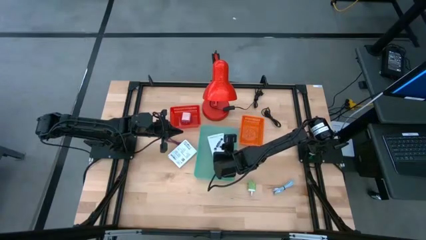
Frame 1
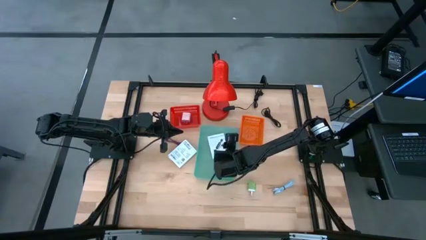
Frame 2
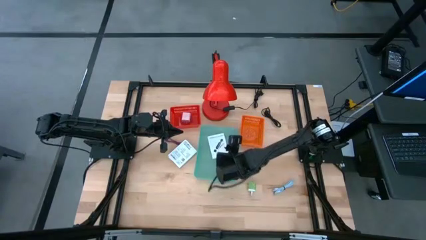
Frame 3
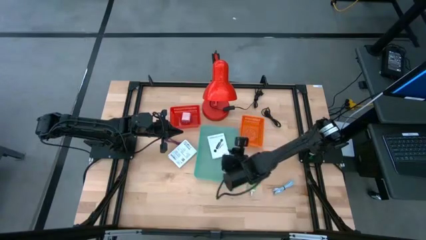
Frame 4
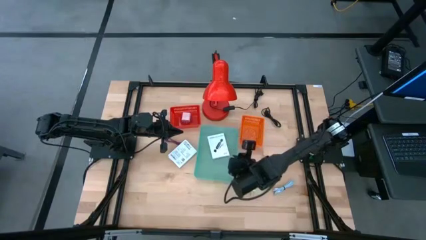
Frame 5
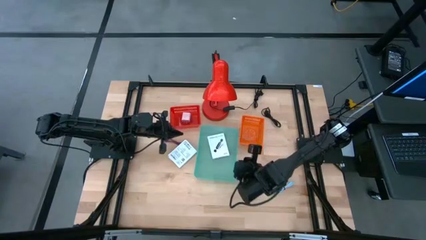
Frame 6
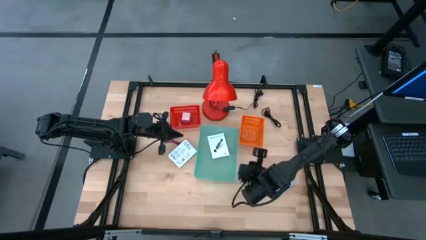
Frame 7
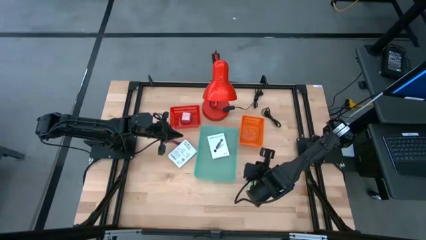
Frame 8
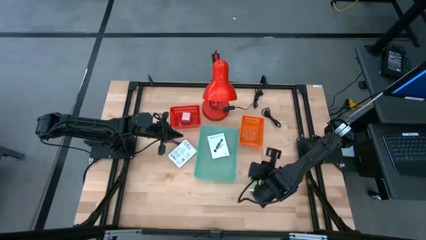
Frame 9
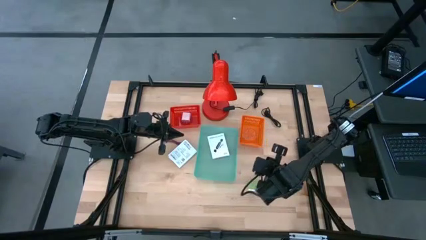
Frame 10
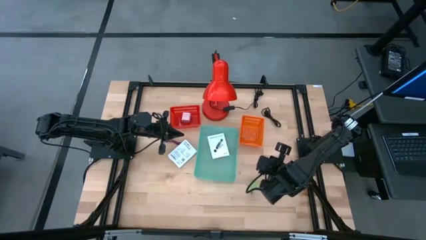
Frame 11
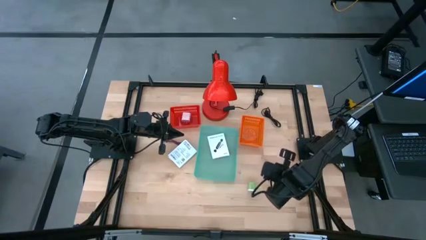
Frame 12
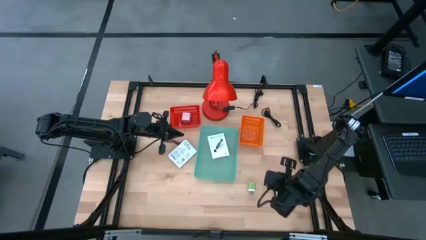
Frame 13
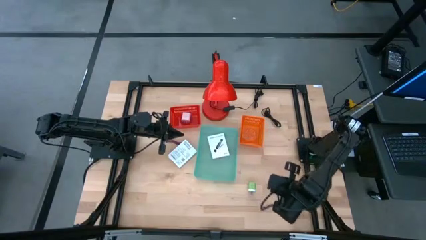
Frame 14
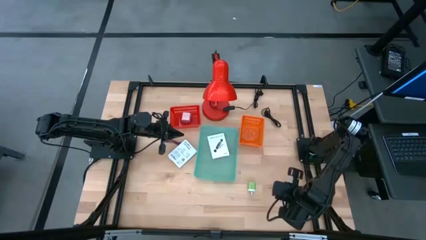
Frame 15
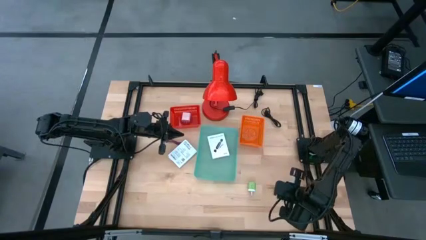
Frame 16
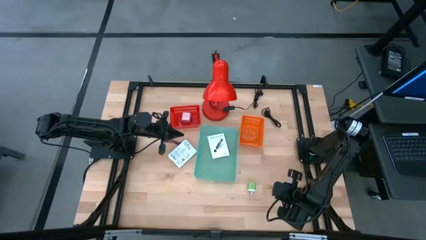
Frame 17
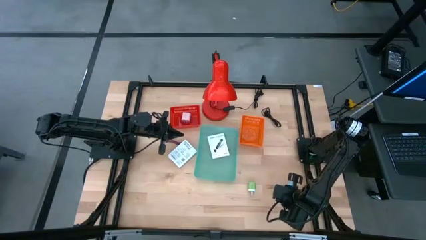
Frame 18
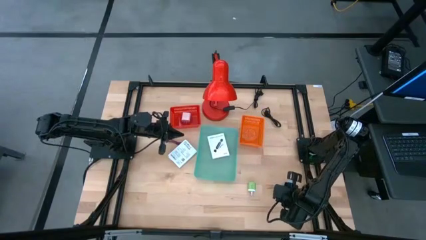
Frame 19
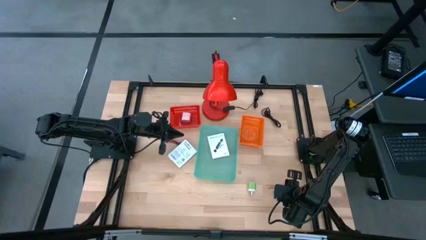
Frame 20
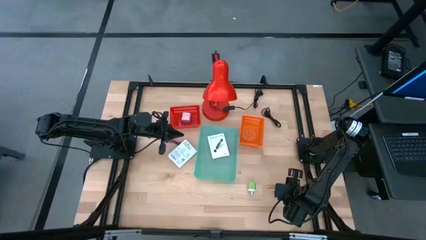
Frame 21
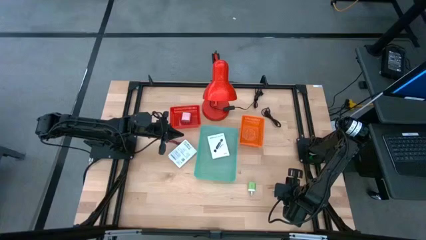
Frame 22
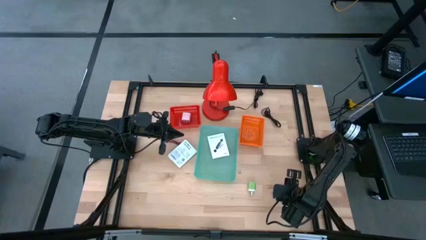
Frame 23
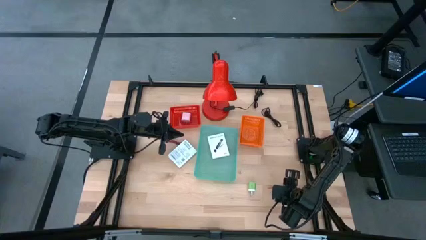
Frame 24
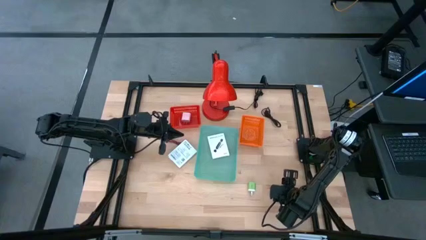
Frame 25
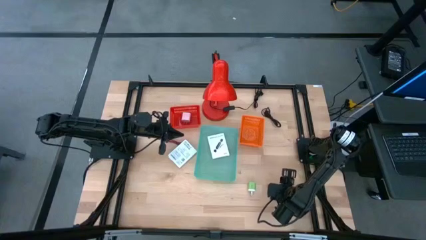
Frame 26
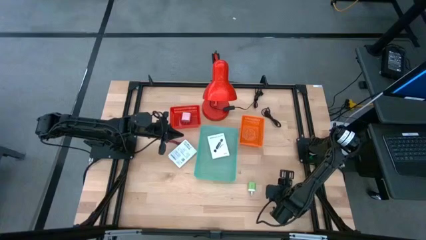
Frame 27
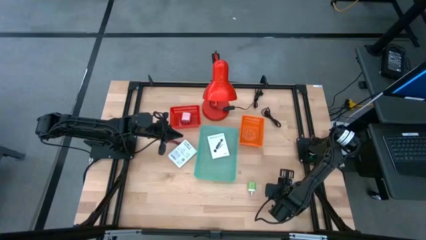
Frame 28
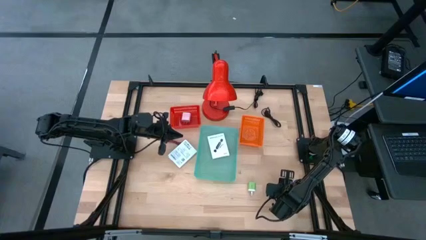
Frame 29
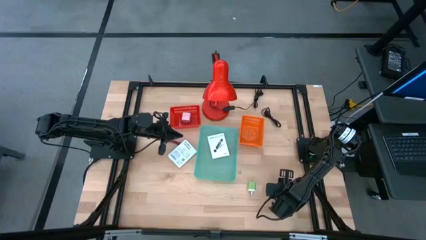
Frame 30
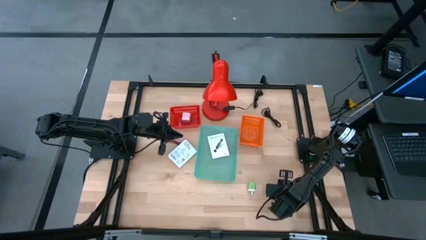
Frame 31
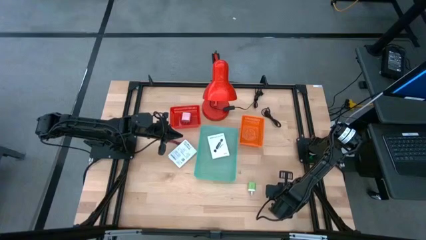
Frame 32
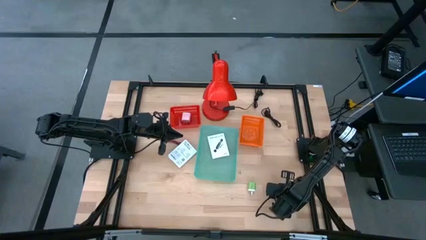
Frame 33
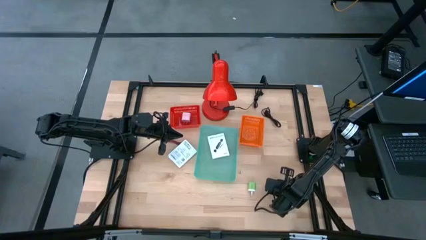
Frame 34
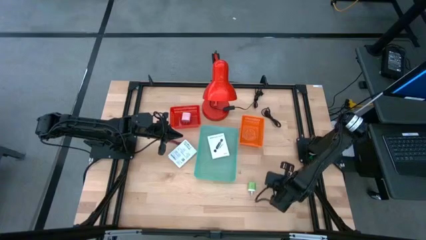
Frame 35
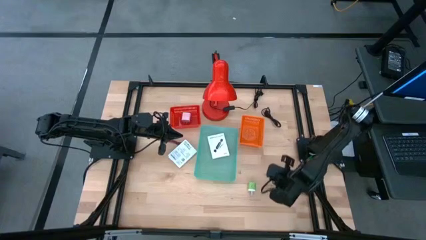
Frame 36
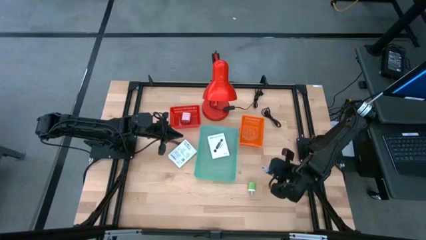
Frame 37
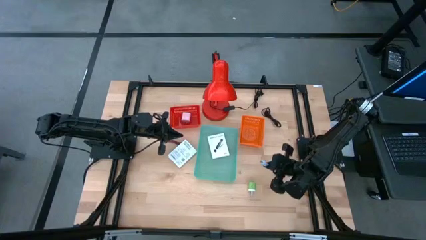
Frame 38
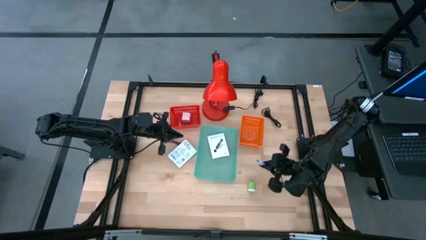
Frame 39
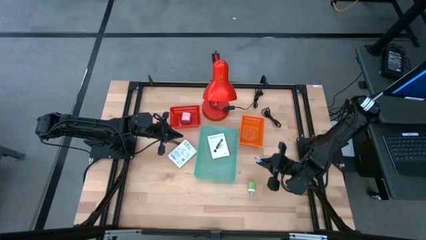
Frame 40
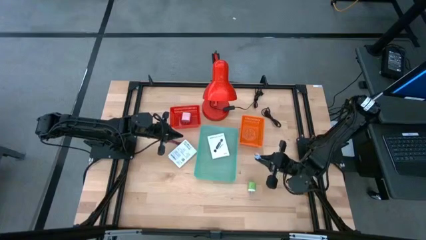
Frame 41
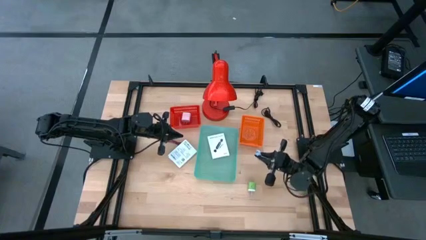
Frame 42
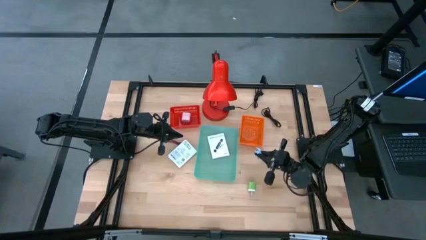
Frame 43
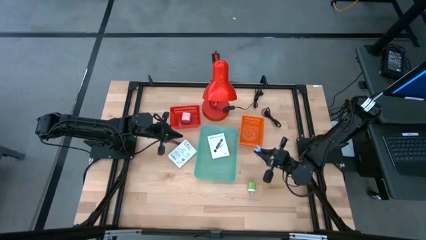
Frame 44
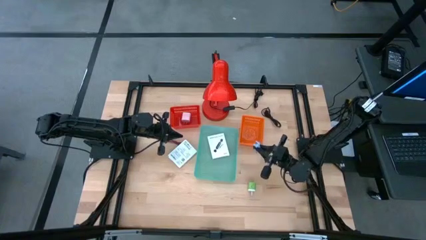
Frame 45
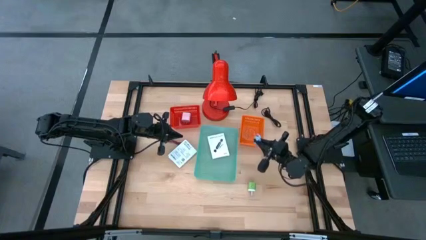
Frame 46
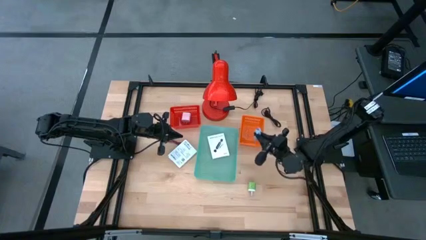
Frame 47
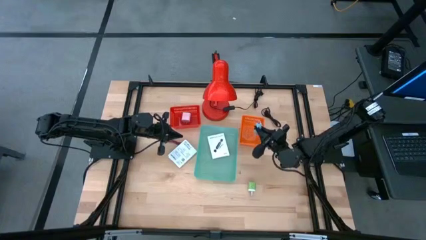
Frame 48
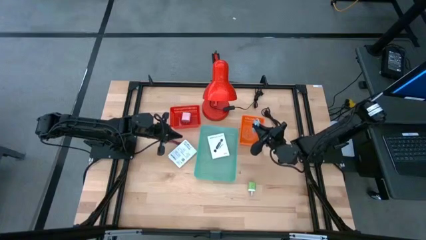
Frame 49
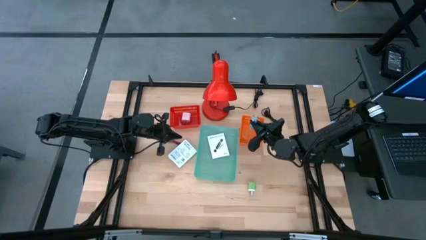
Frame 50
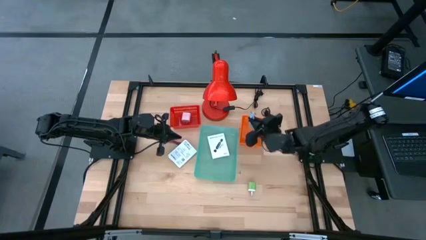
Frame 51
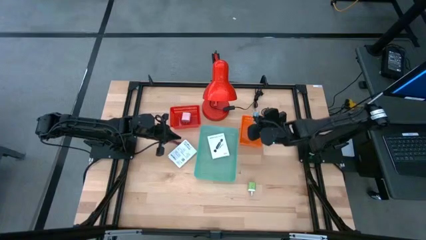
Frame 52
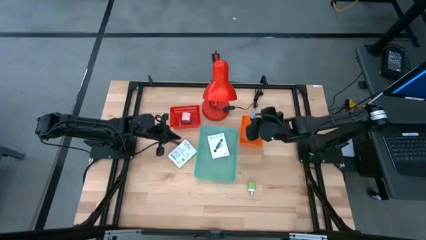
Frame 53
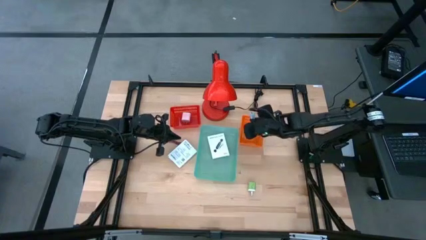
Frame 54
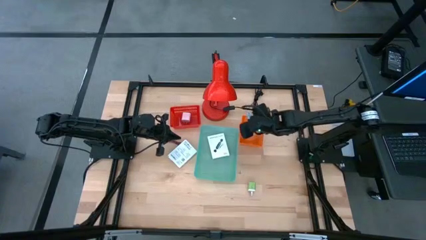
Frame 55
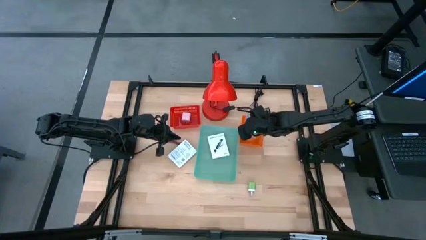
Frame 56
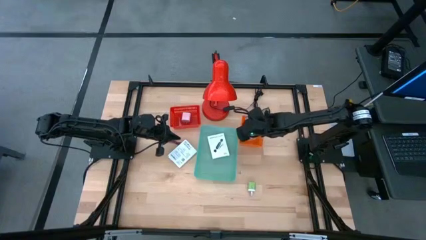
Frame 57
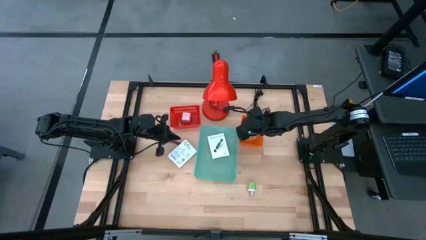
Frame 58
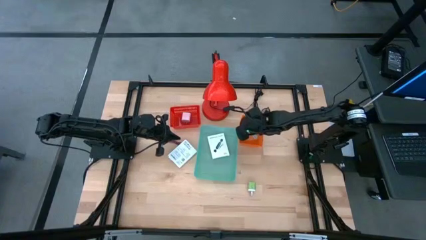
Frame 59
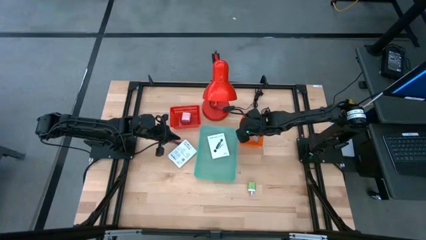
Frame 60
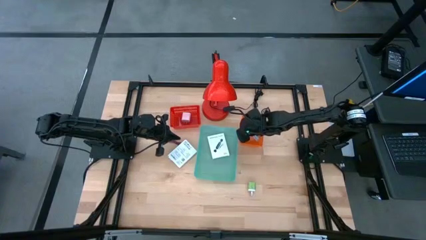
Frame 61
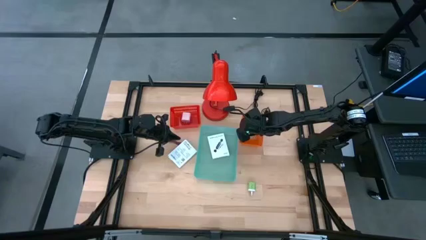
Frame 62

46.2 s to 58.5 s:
Task: Pick and place items into bin
Put the white USB cable into the orange basket
